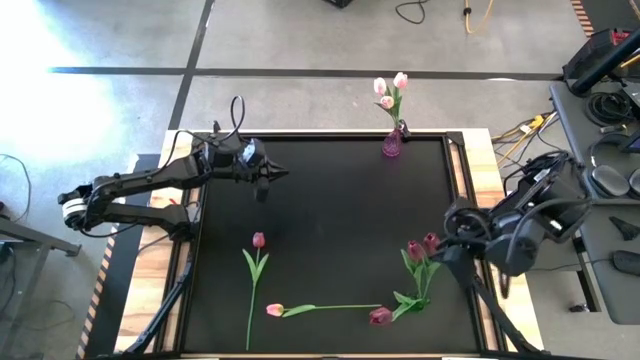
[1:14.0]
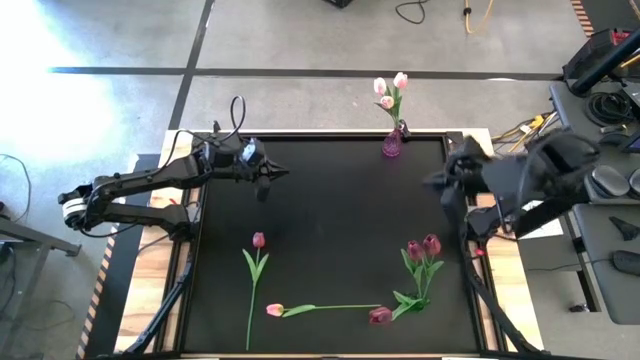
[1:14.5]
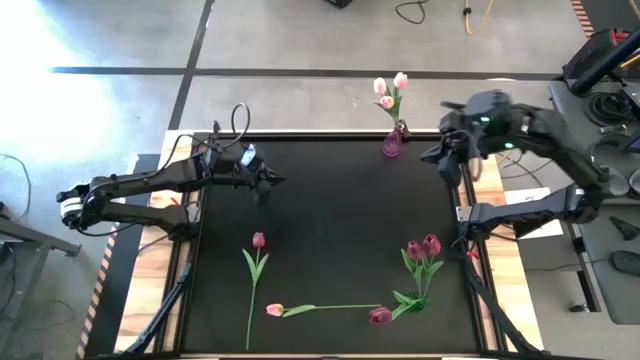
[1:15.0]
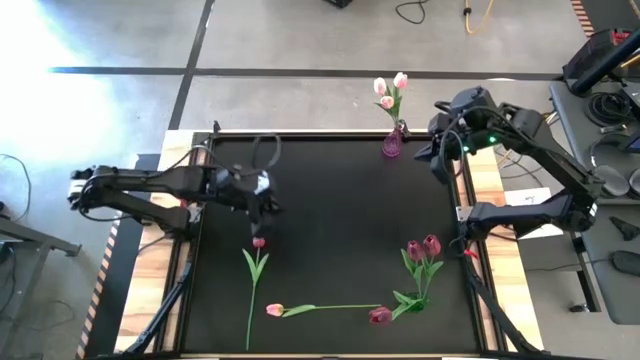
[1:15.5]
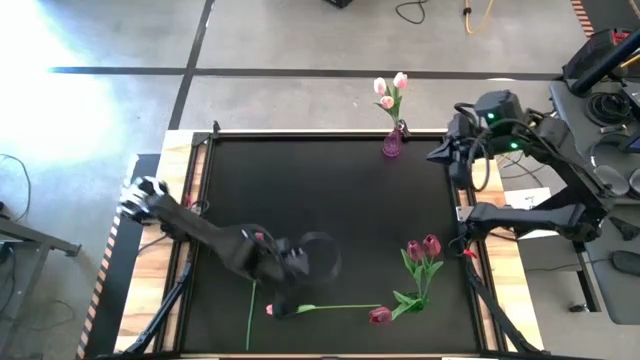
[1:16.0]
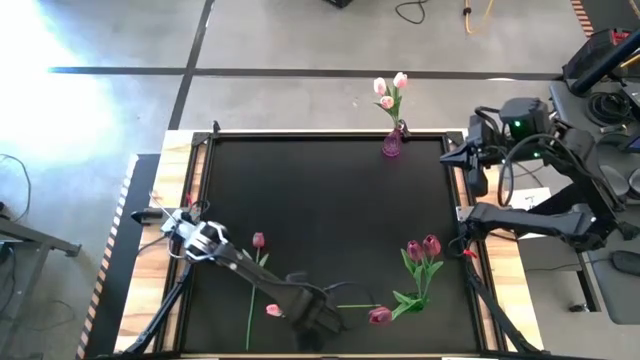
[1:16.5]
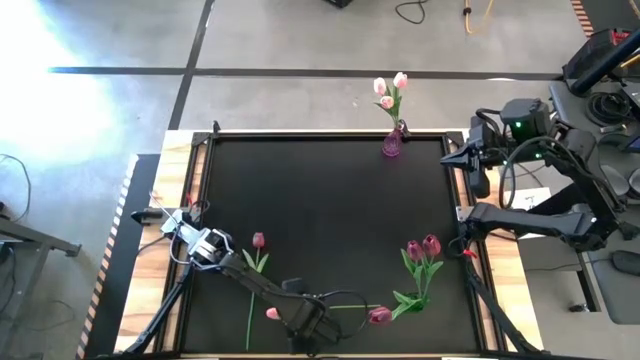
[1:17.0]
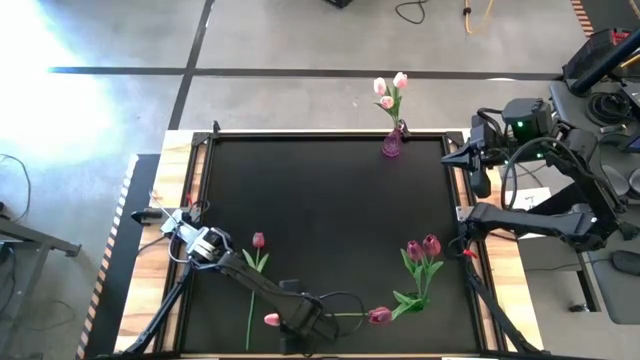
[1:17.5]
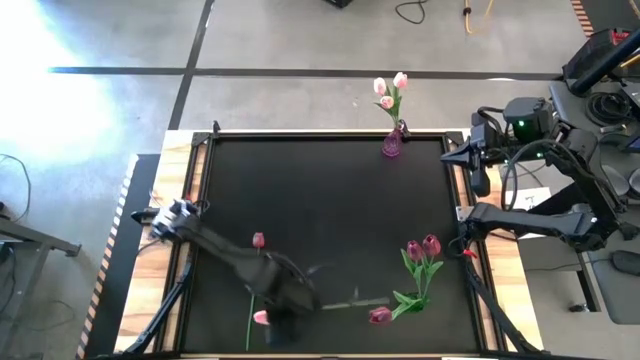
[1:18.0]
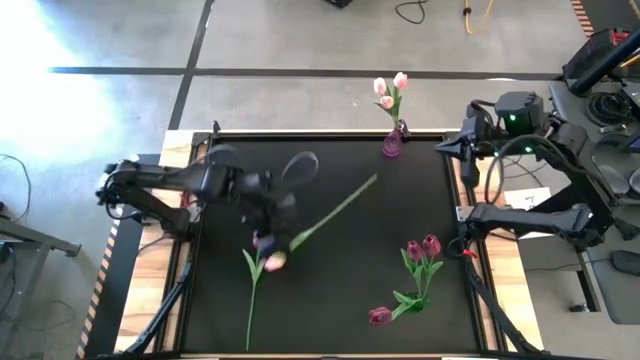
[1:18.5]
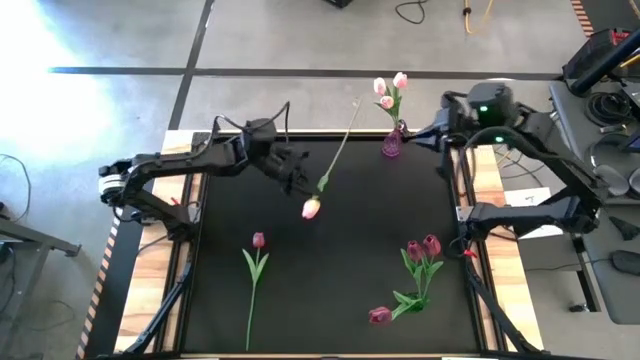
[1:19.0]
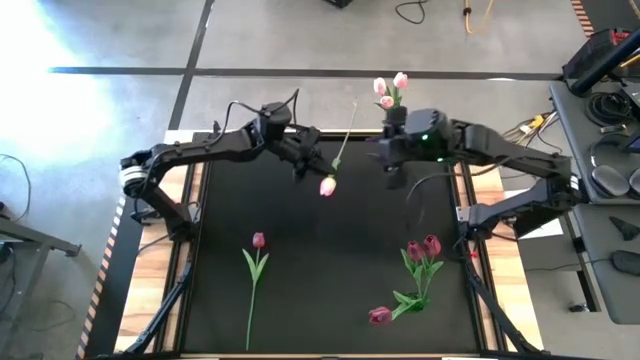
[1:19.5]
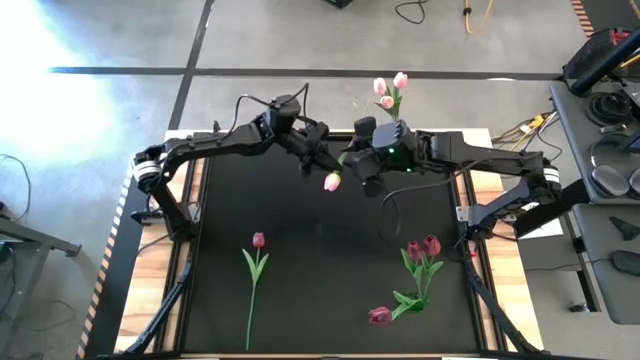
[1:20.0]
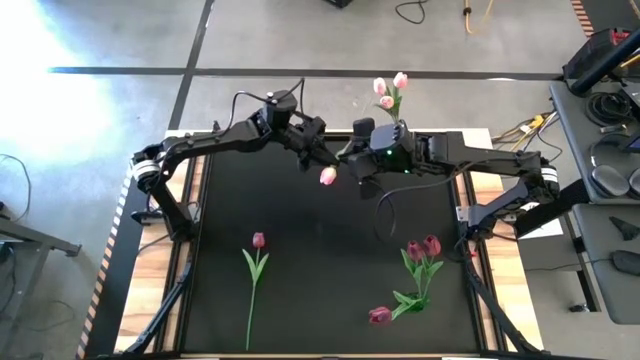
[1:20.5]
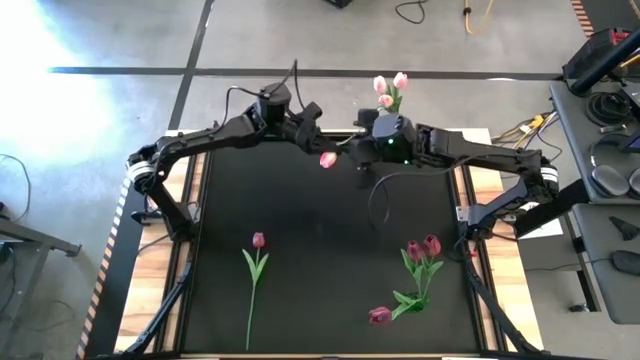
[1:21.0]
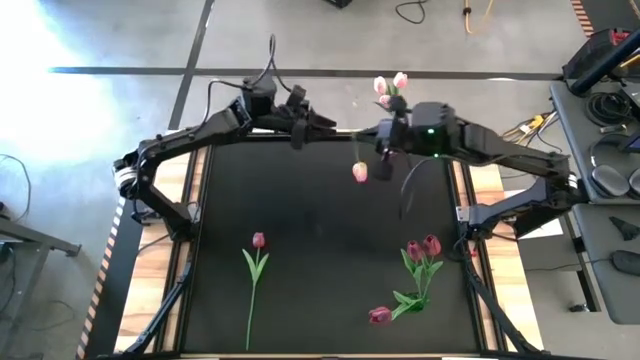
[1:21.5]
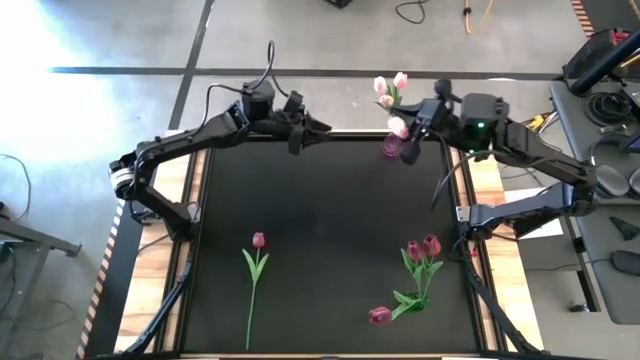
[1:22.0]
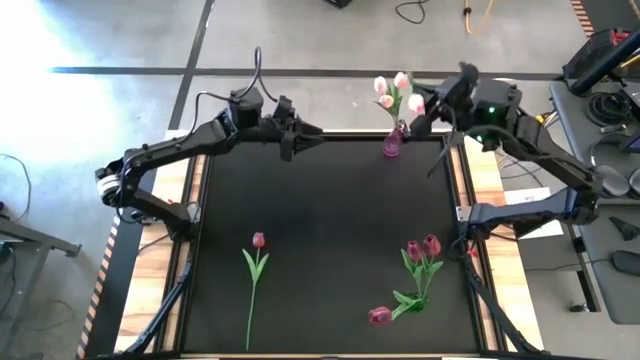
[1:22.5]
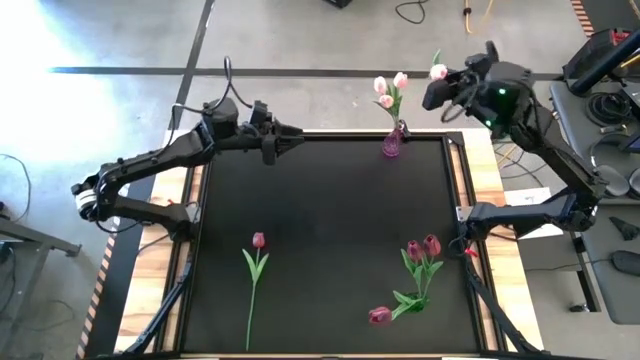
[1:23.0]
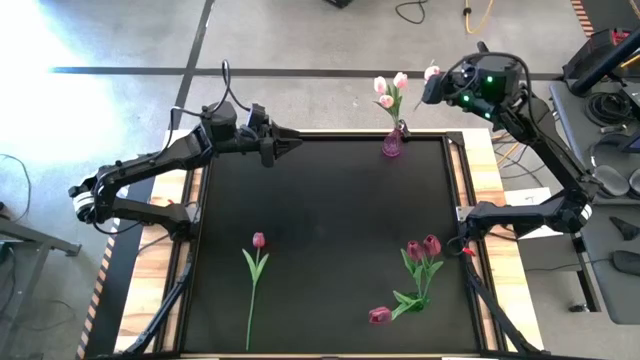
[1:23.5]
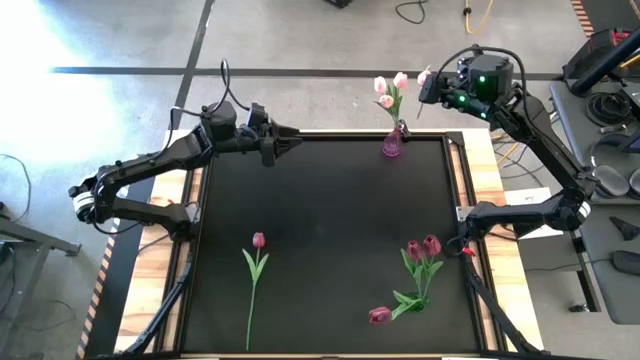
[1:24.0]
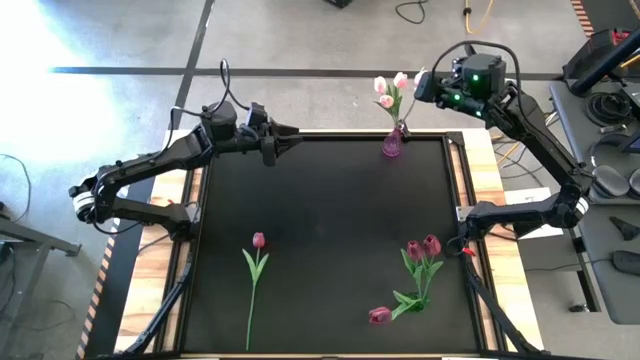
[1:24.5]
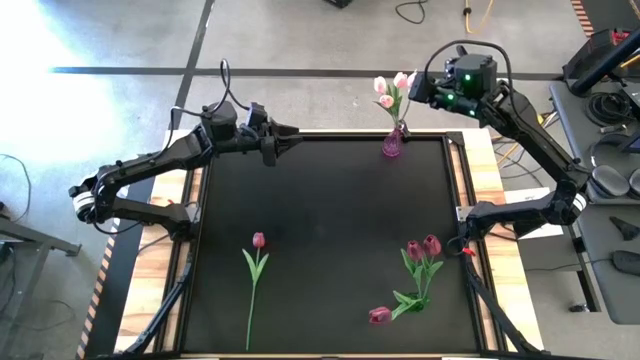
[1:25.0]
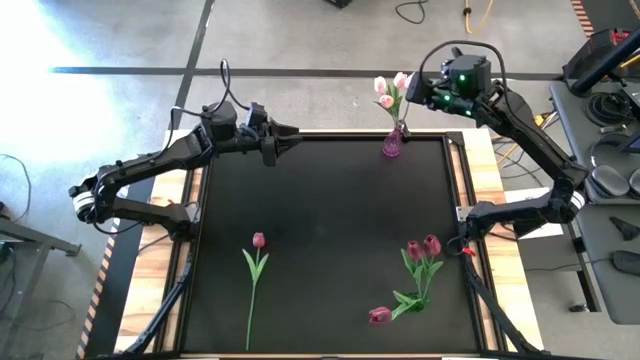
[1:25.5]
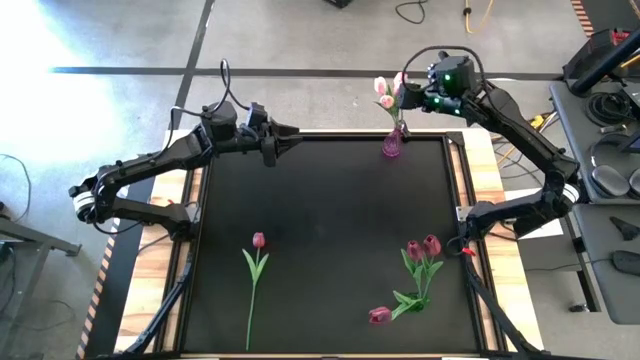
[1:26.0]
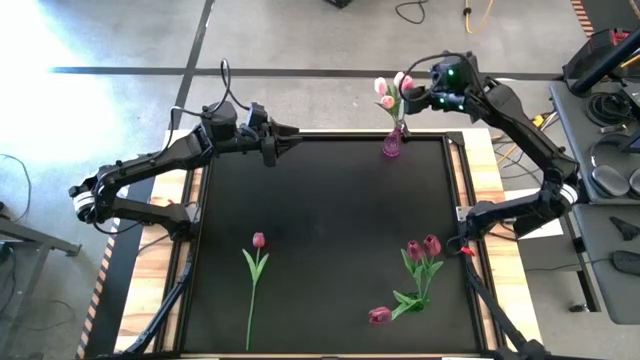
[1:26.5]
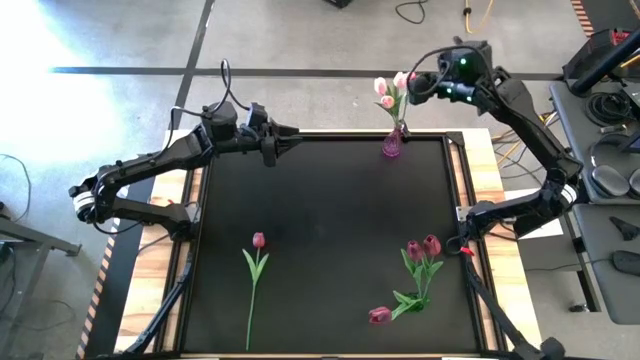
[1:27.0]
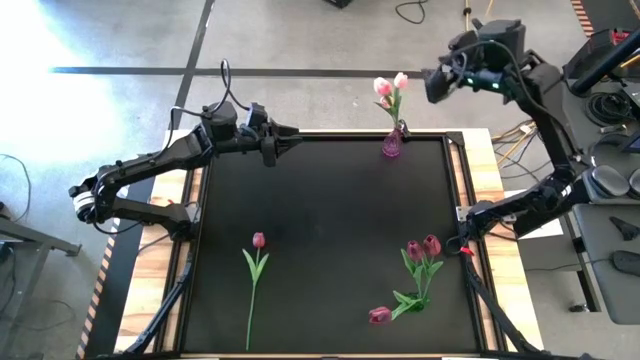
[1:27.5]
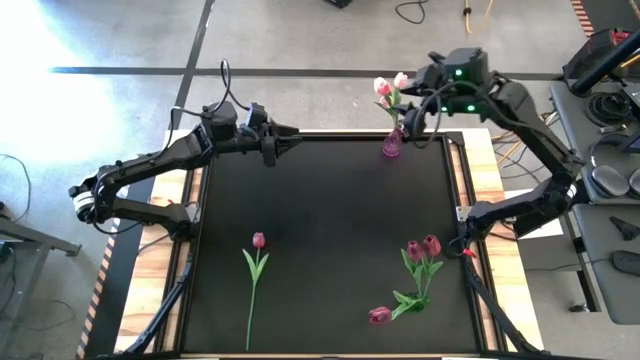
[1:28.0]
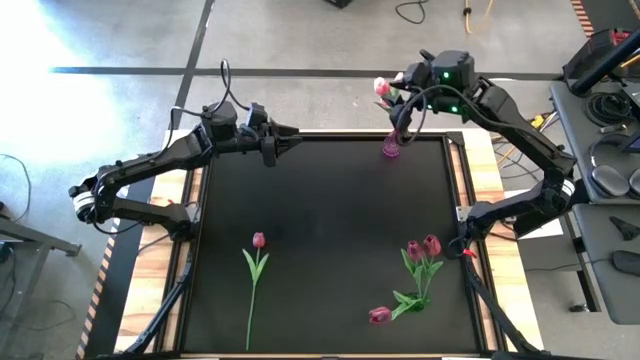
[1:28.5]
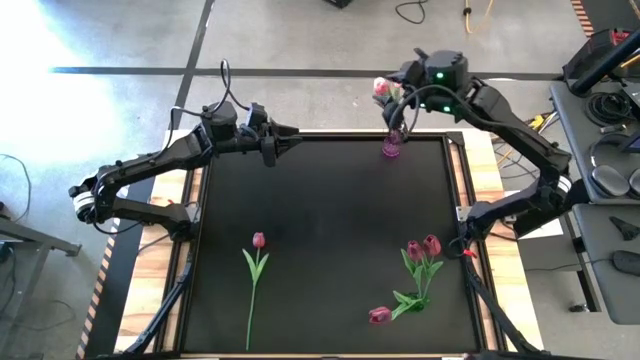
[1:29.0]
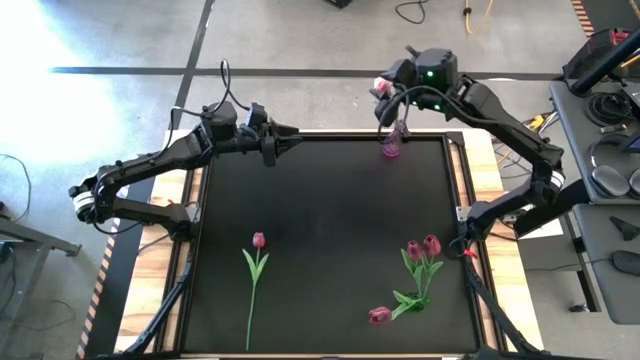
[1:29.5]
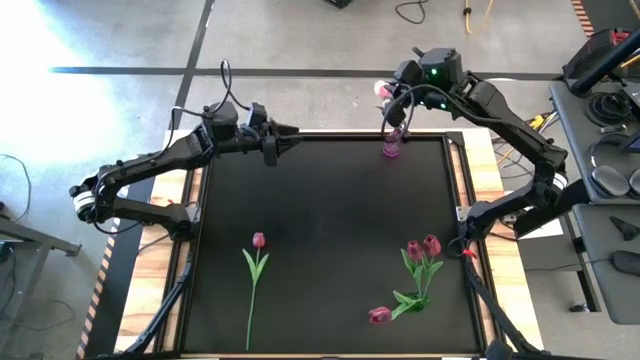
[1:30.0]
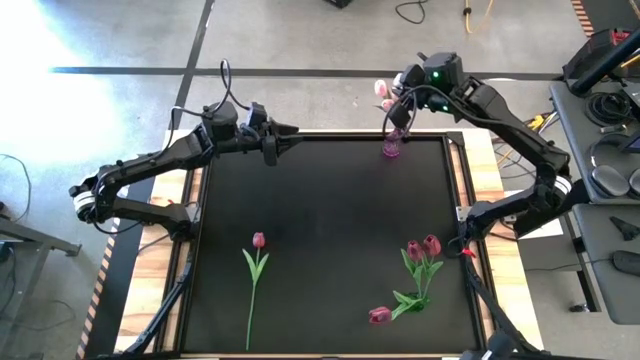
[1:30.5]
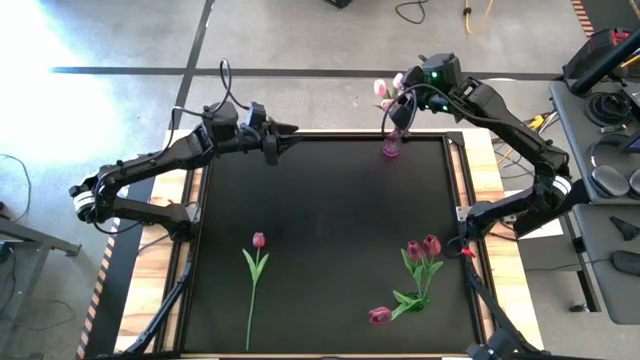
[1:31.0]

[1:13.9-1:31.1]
Task: Sort flowers into vase by color
Put the pink tulip into the transparent pink vase

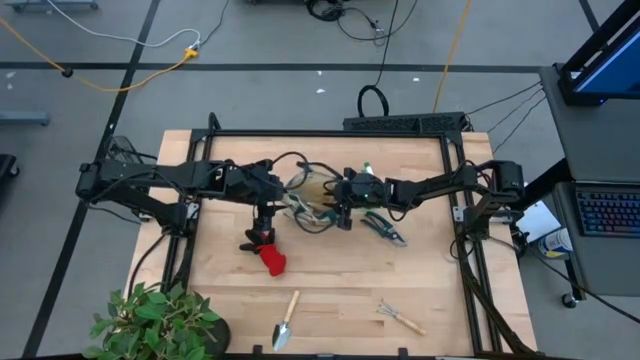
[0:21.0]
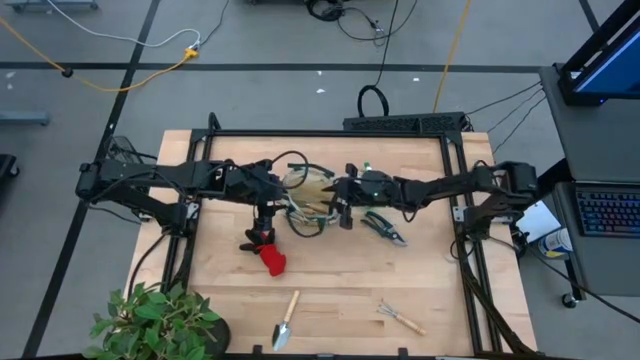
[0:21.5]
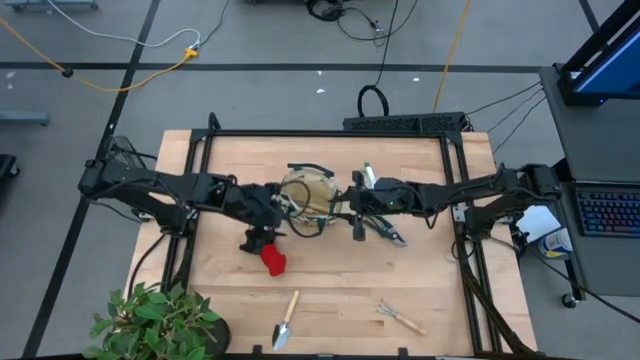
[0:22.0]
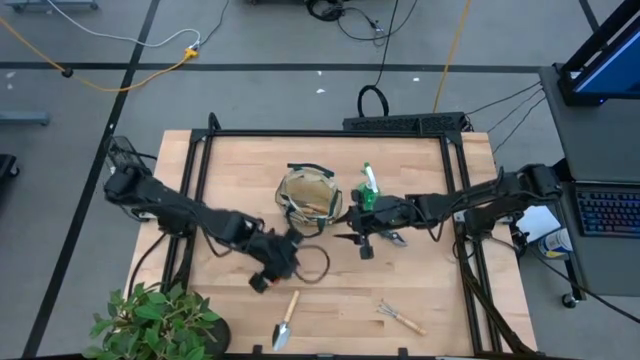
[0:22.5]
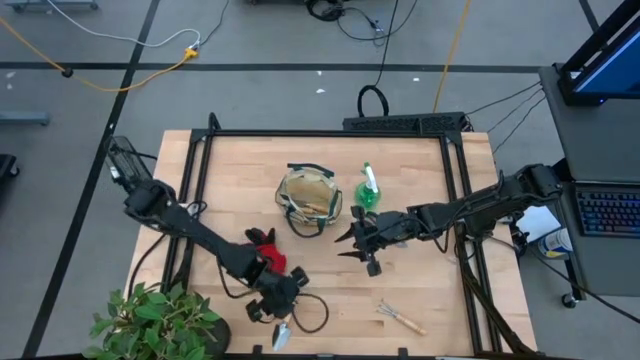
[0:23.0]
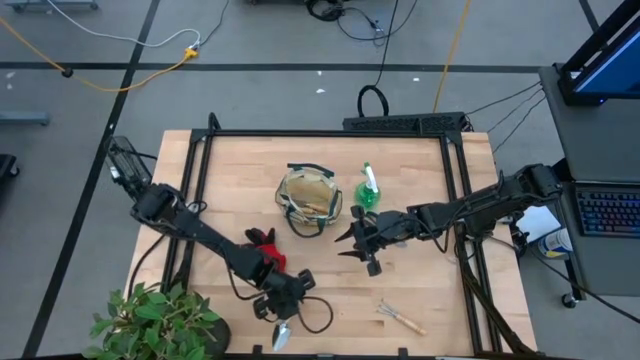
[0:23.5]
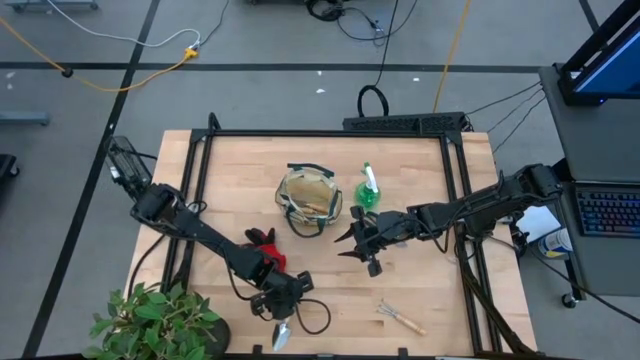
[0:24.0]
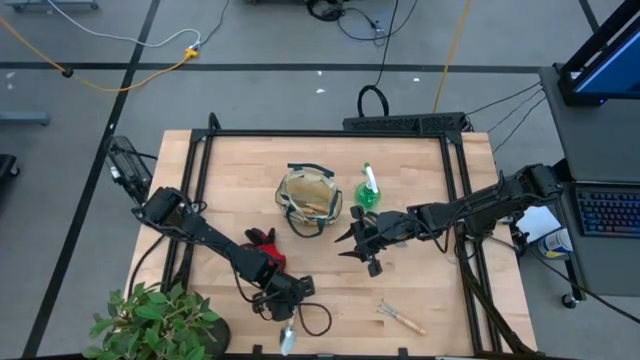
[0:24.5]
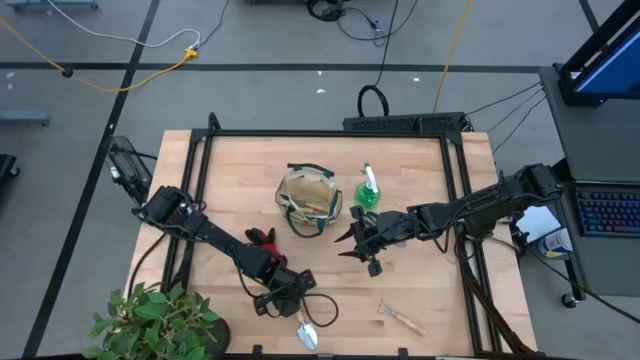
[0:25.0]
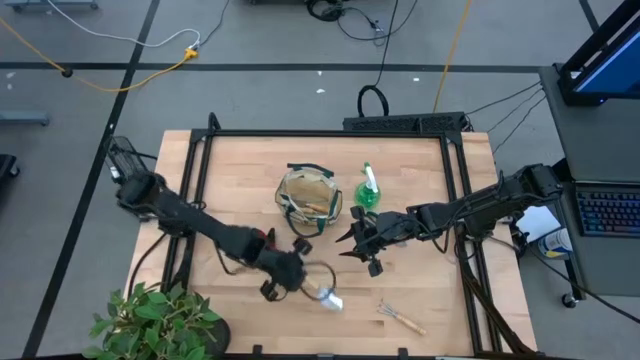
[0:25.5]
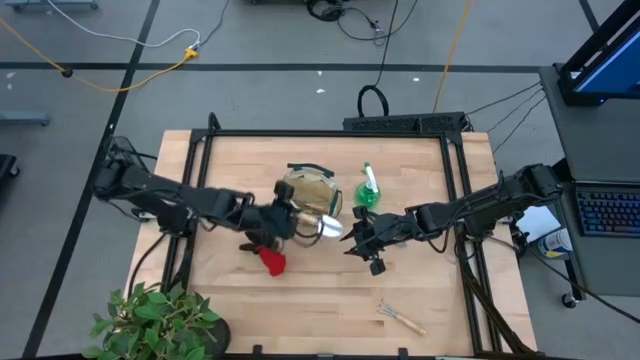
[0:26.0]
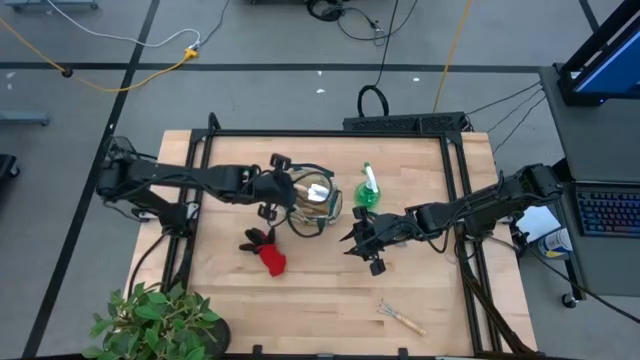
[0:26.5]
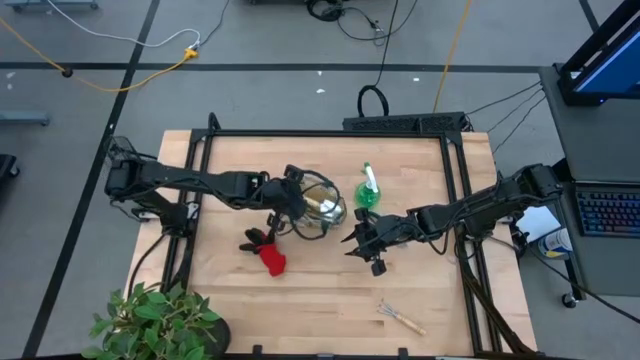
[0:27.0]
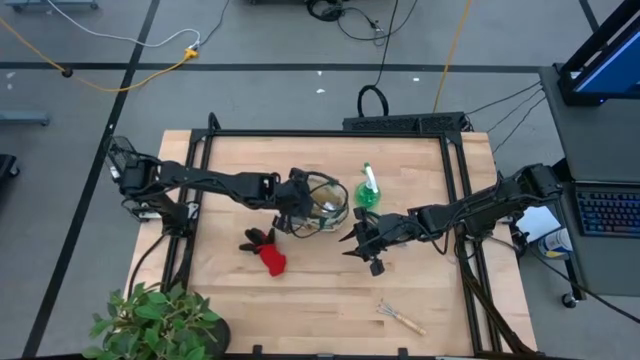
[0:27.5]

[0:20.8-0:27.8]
Task: Pick & Place Garden tools in Gardening bag
Put the brown trowel into the light brown gardening bag
